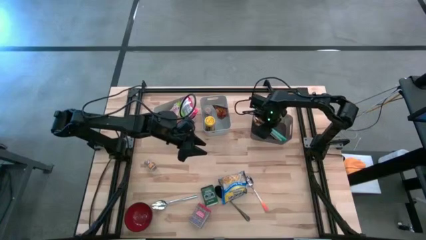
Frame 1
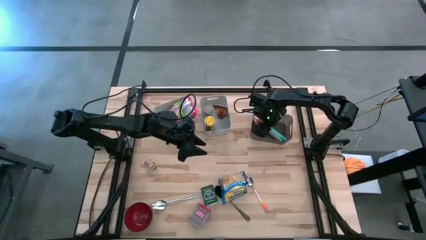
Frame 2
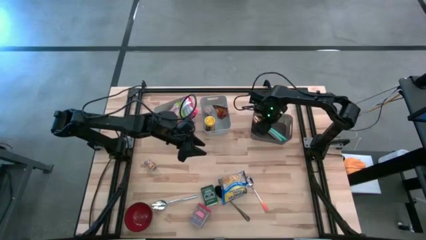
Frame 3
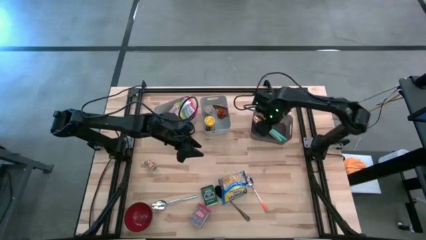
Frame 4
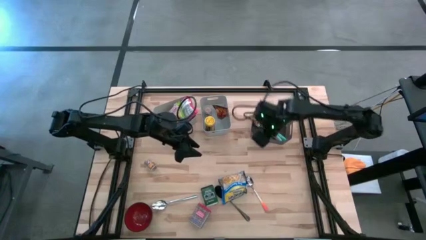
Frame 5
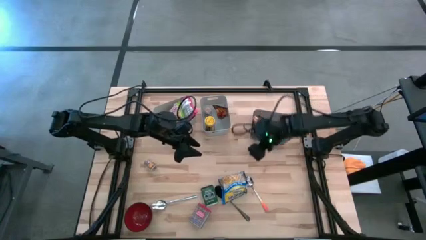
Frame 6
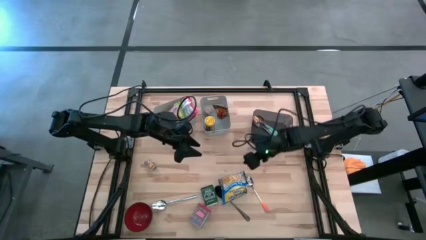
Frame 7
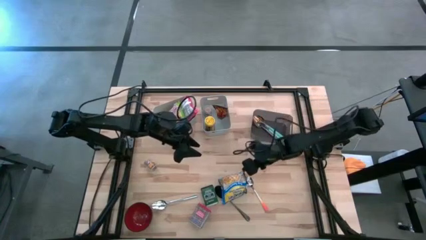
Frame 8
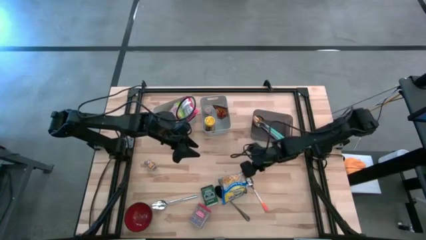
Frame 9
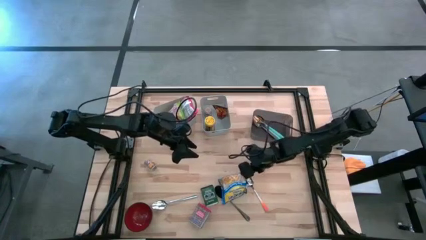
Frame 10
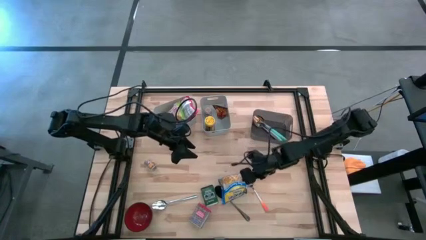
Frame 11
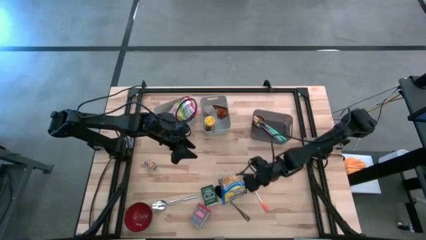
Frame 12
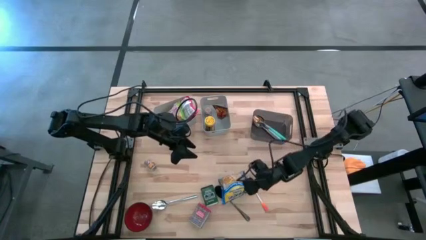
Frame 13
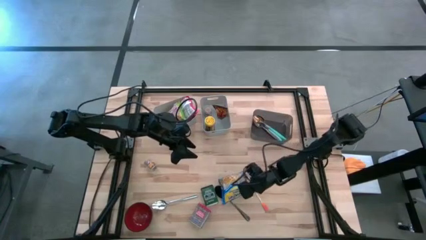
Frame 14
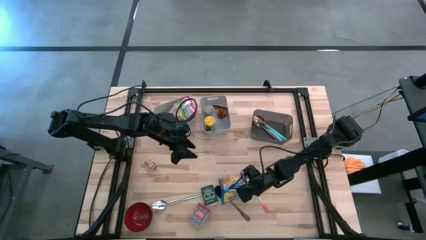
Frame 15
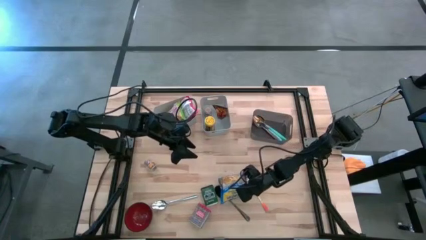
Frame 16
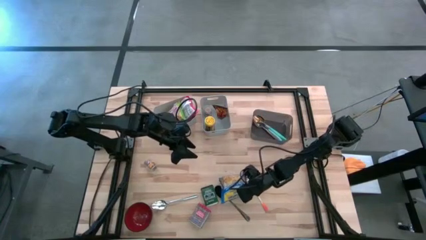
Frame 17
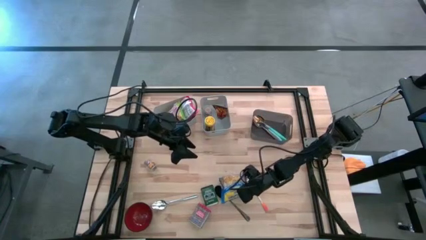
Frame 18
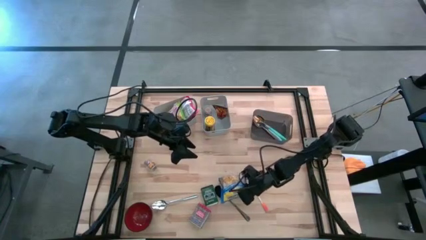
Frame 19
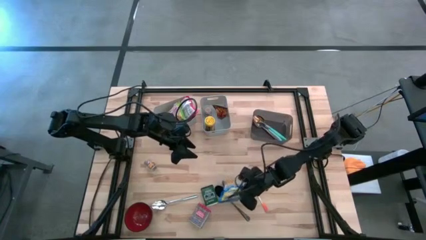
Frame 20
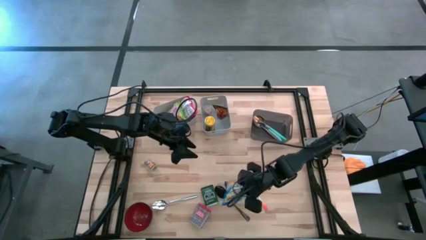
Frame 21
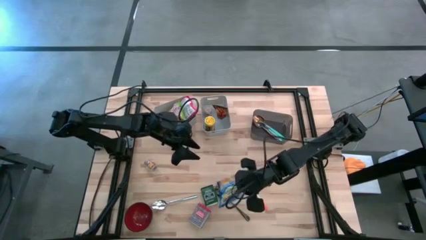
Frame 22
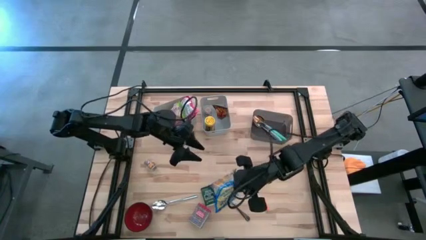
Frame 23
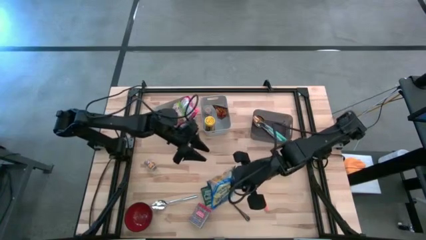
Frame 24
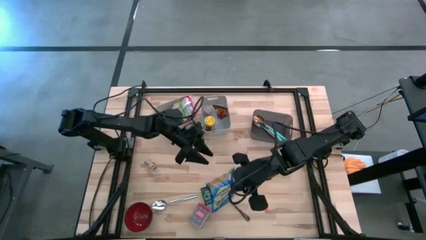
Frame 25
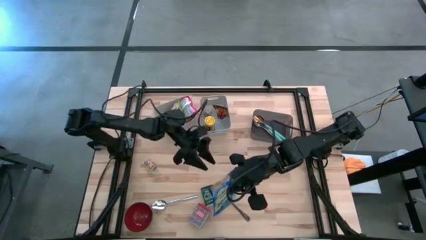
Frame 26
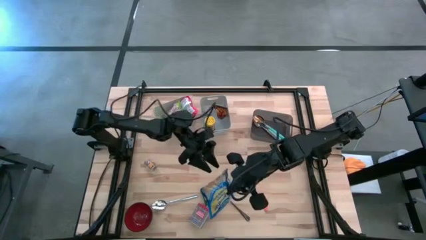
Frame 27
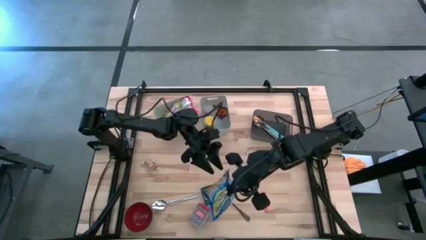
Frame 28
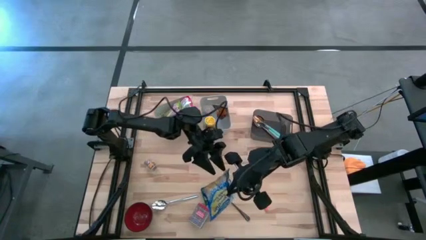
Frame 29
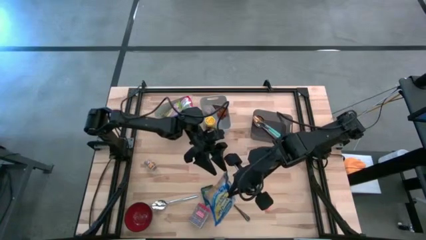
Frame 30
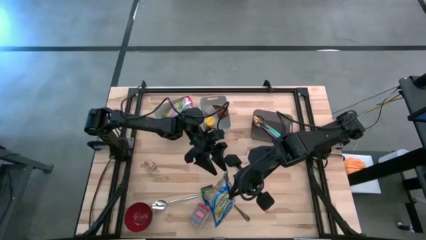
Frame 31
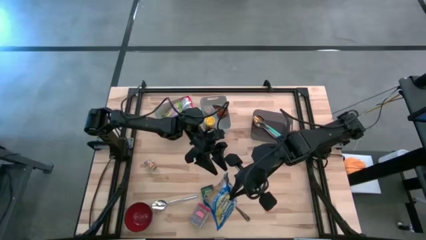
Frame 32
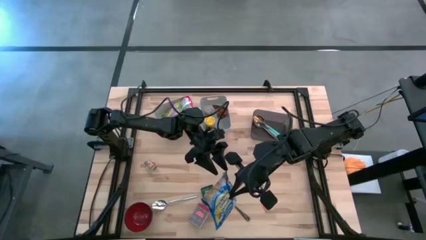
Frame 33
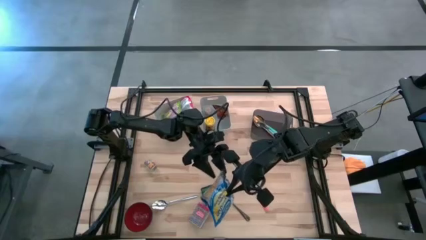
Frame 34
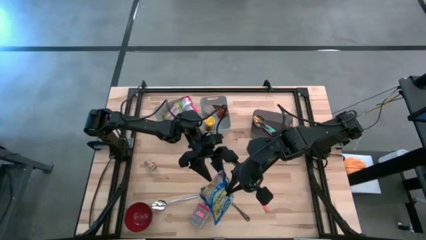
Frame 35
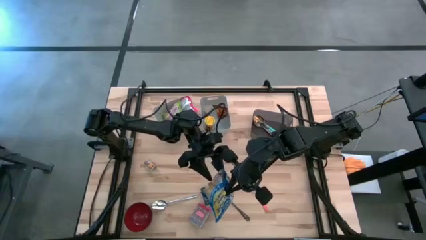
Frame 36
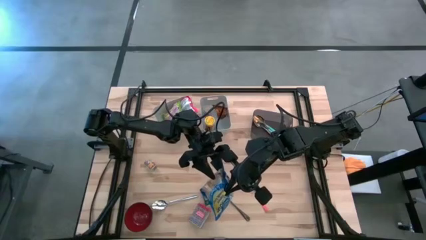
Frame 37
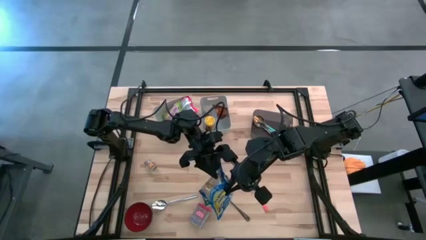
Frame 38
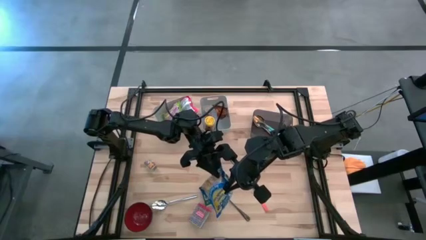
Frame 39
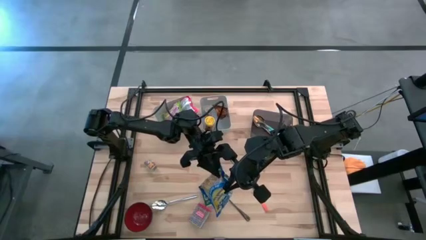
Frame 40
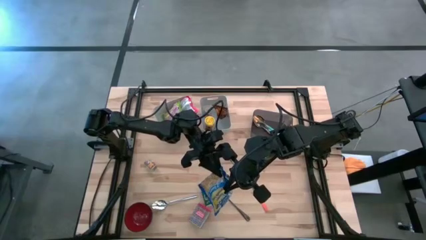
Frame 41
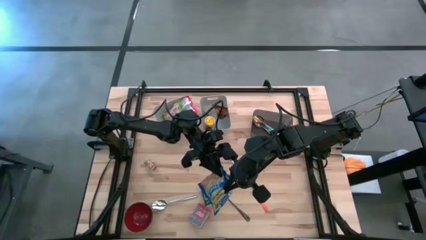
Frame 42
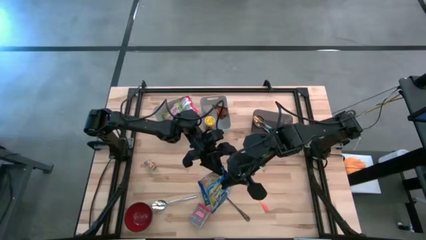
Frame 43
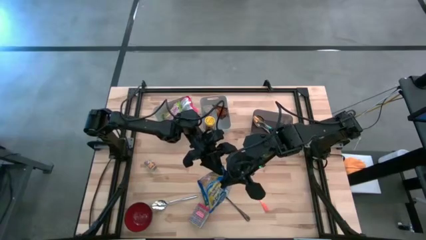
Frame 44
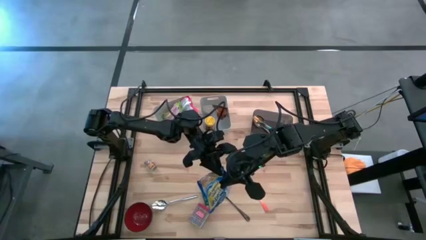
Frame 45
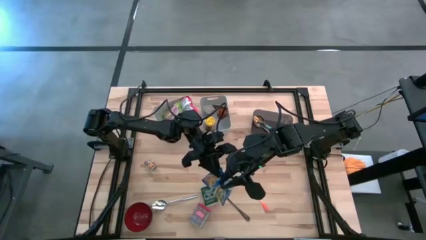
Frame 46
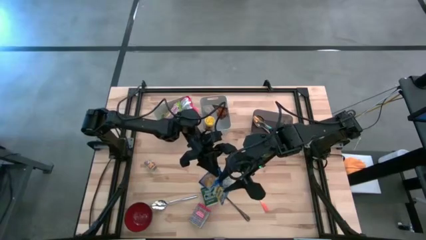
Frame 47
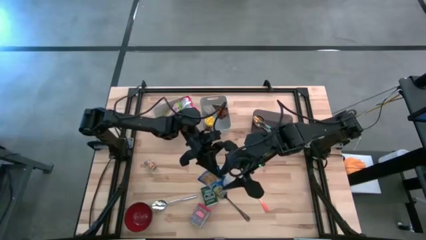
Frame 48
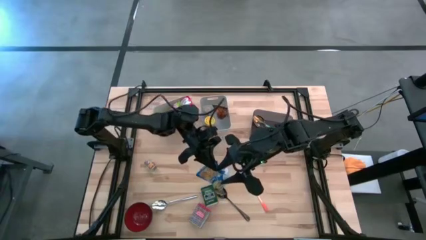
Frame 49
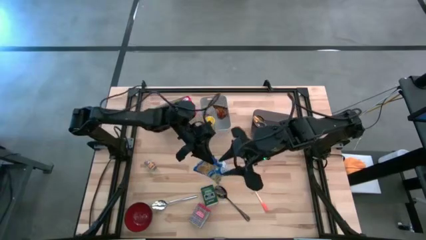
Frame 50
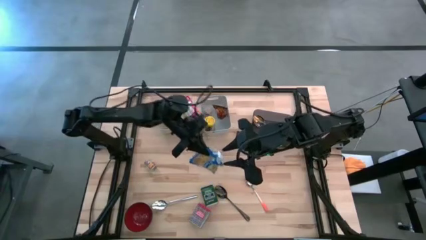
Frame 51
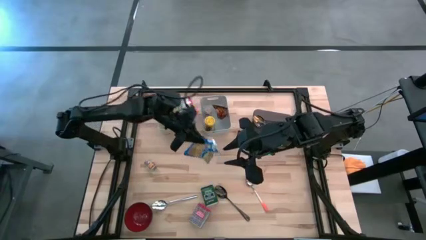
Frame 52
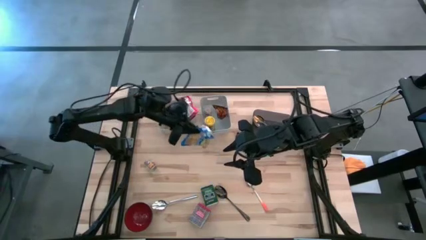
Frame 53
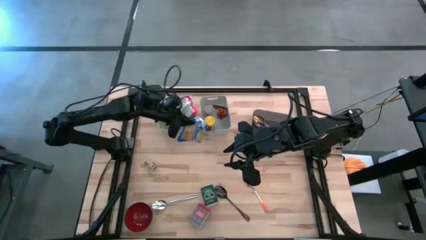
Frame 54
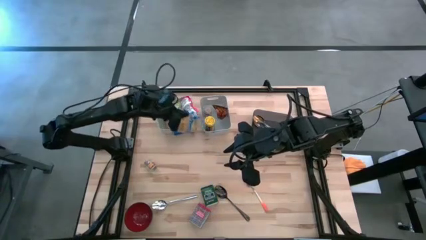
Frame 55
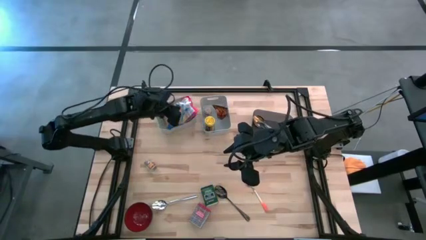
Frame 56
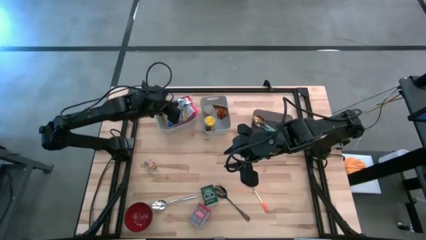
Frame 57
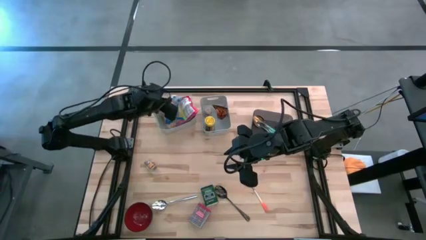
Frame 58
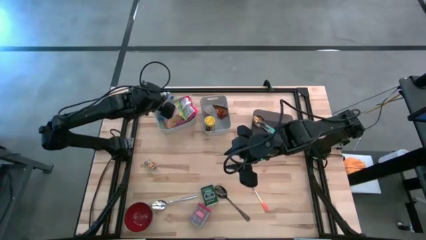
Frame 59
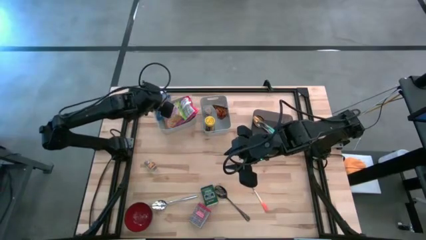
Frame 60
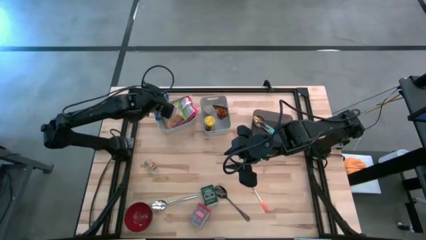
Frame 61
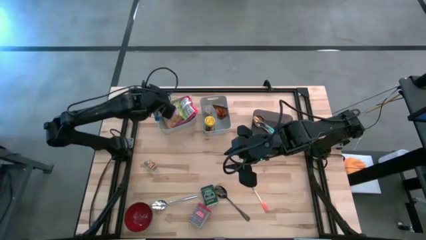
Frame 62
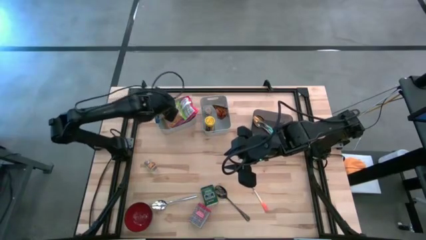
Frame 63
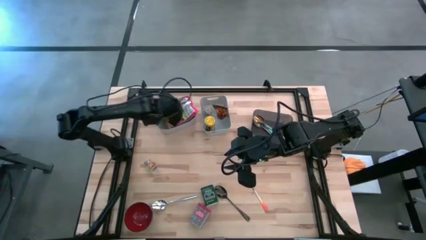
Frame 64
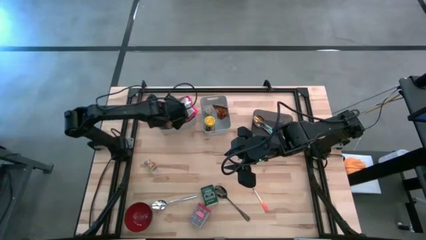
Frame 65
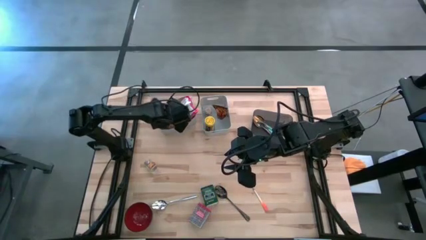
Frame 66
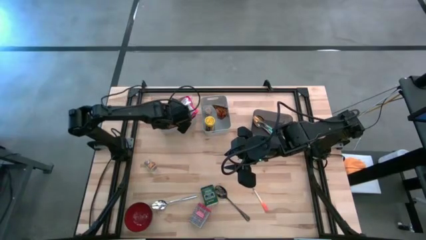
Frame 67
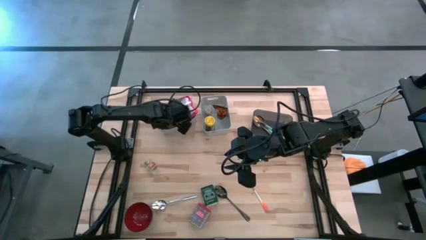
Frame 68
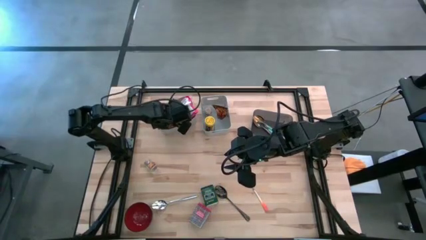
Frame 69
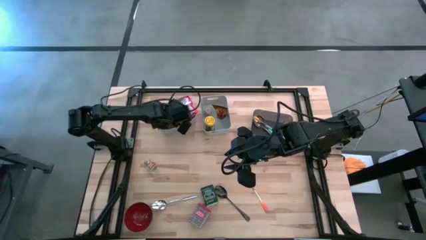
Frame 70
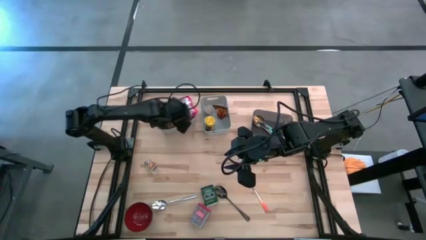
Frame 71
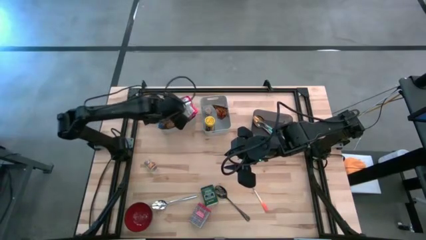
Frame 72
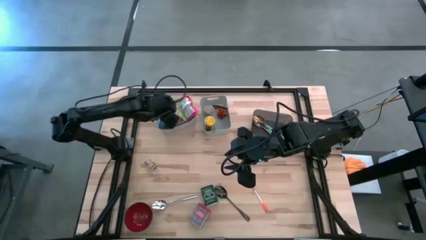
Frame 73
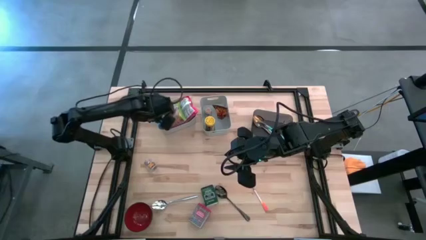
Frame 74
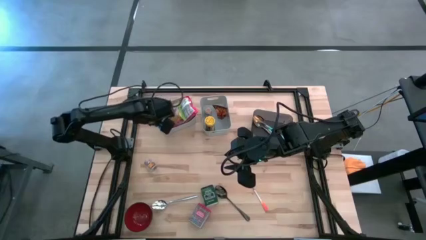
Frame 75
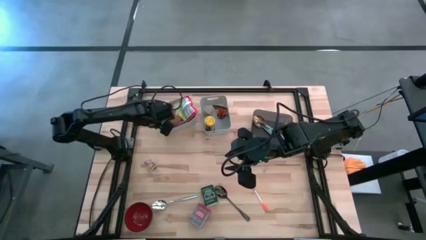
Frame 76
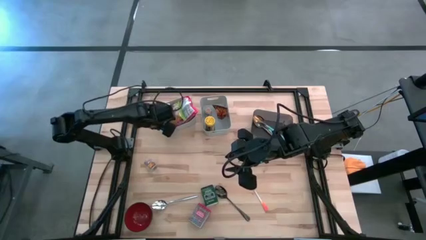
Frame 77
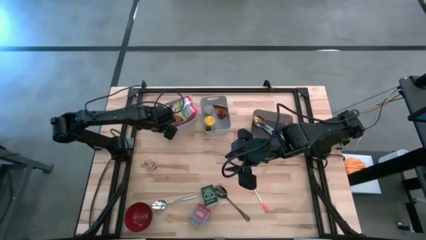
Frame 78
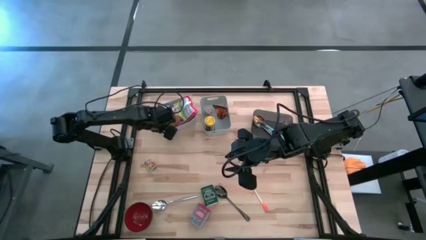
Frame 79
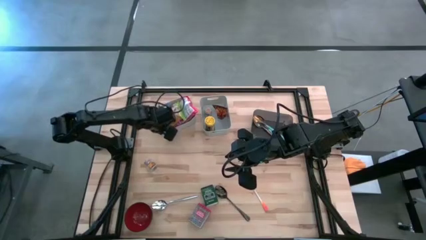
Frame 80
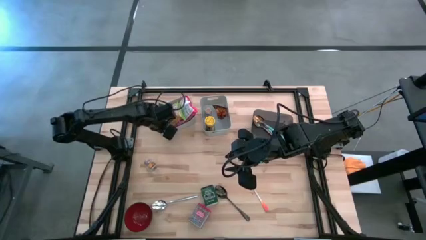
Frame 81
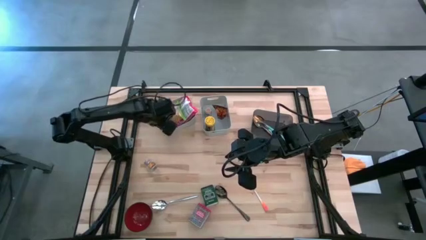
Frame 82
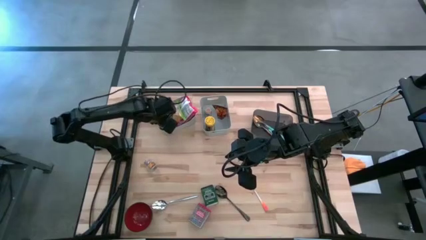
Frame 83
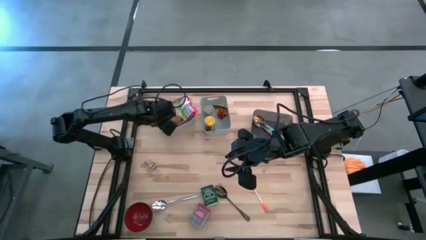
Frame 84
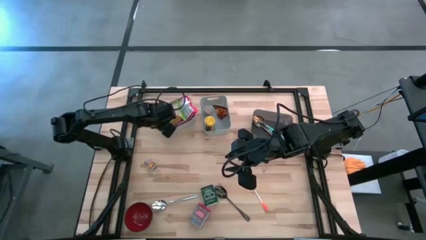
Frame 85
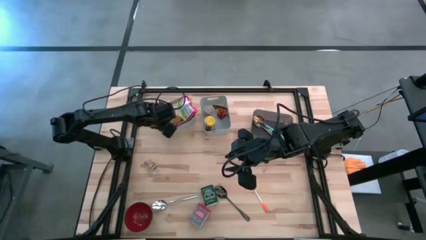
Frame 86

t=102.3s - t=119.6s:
Put the blue noodle pack into the left gray bin
